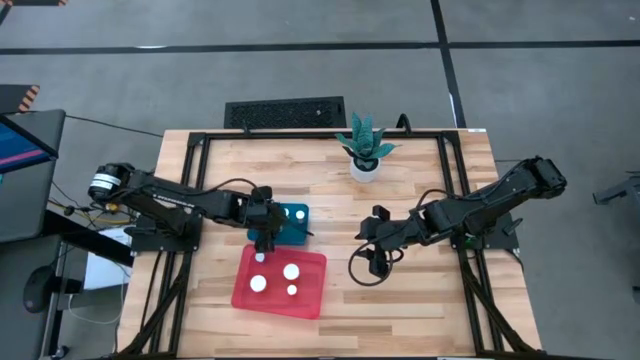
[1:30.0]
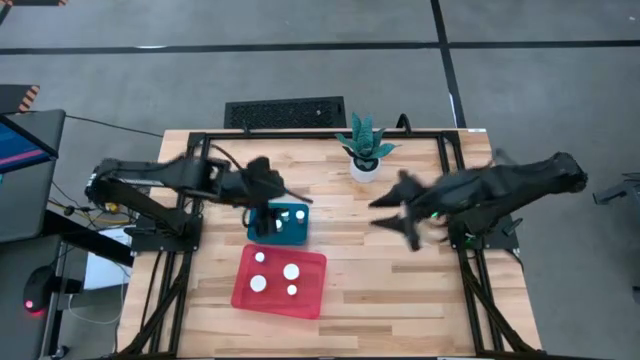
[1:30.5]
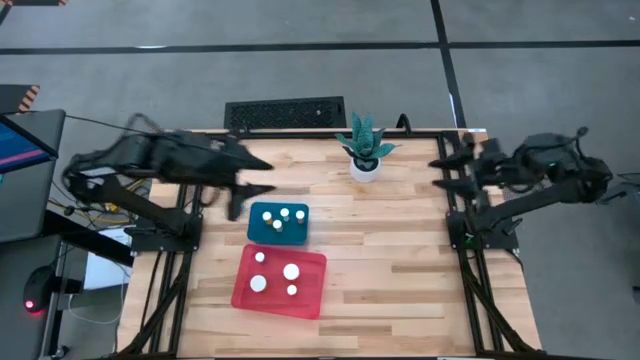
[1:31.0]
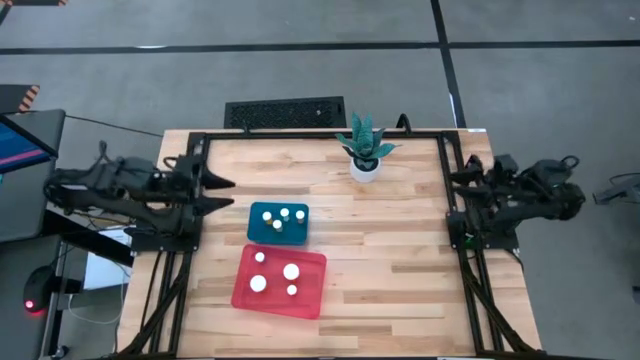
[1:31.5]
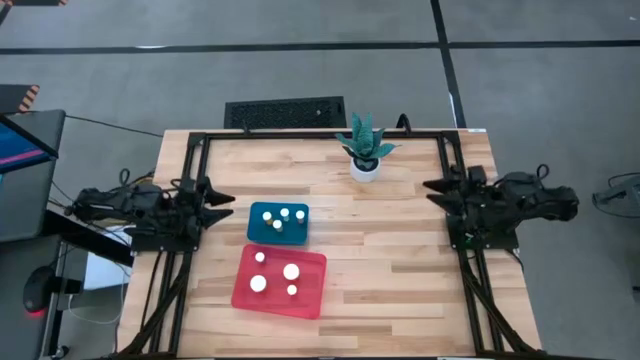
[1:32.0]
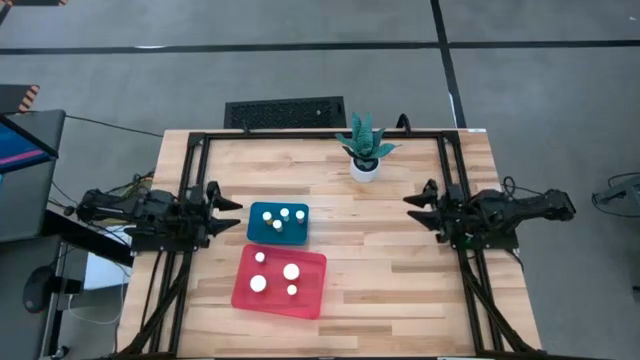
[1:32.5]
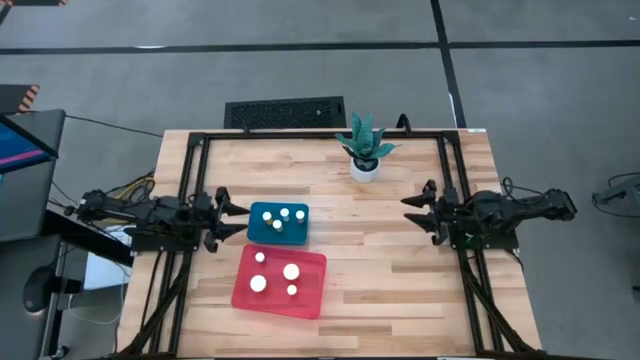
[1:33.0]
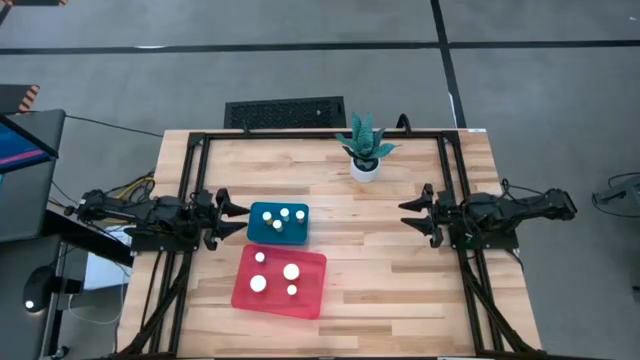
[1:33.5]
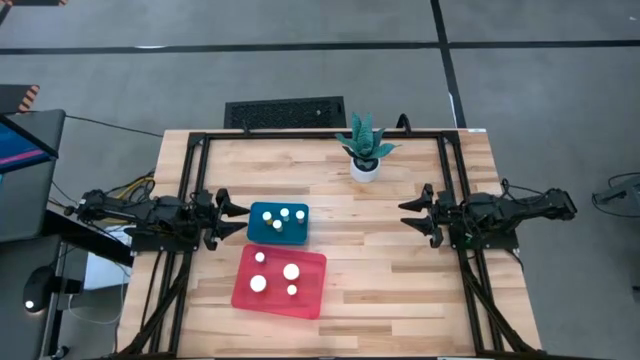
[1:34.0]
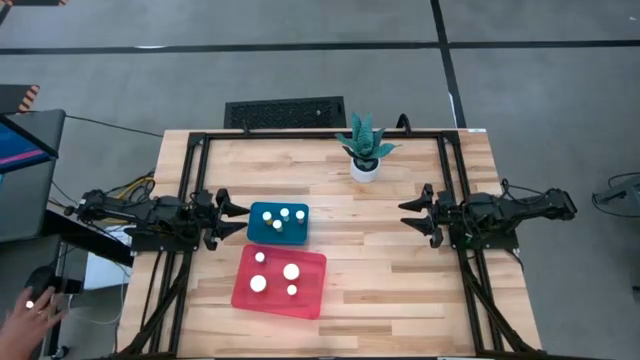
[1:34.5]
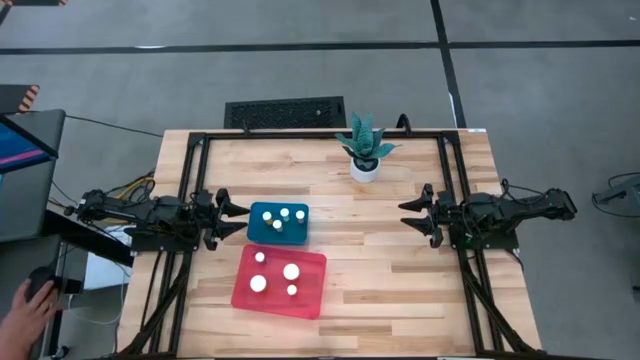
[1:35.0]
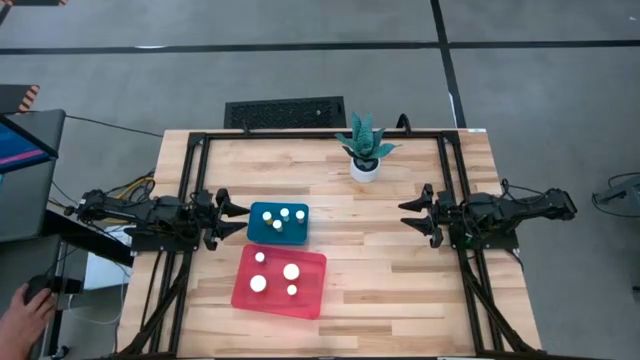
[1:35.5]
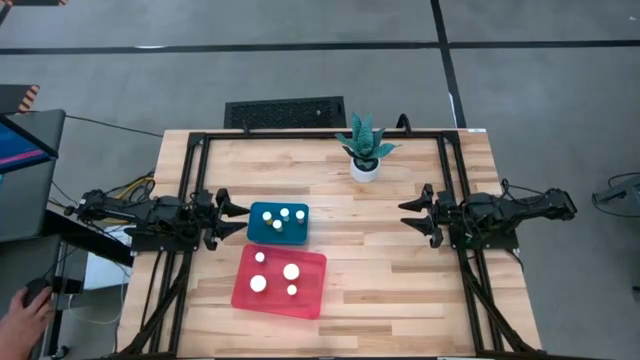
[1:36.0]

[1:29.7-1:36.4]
Task: Pick and place medicine bottles into bin by pill shape (circle, oval)
Return to Home Position

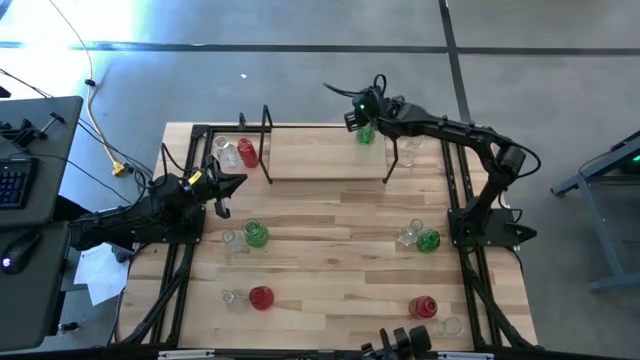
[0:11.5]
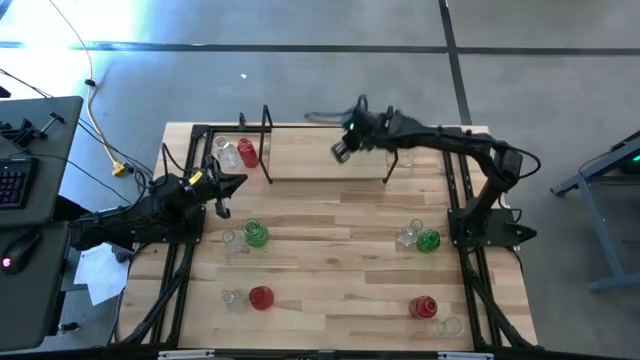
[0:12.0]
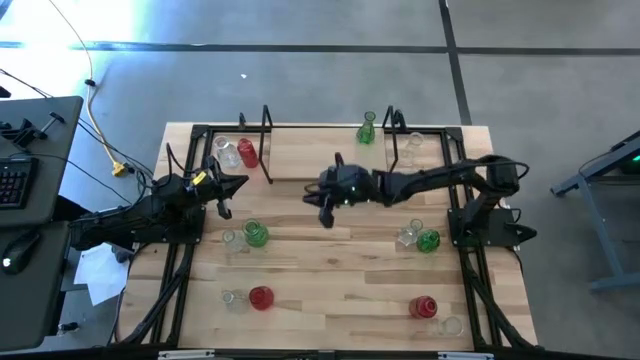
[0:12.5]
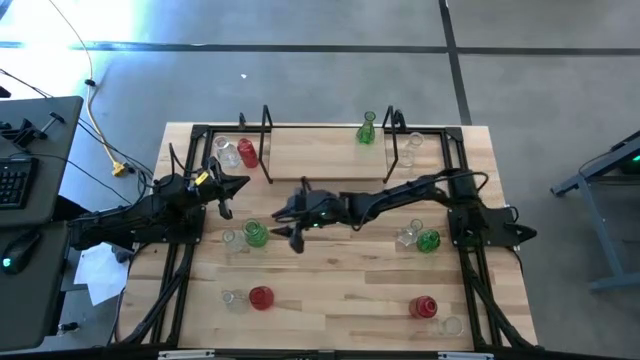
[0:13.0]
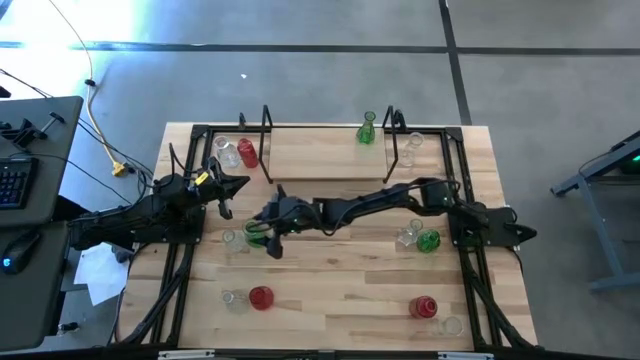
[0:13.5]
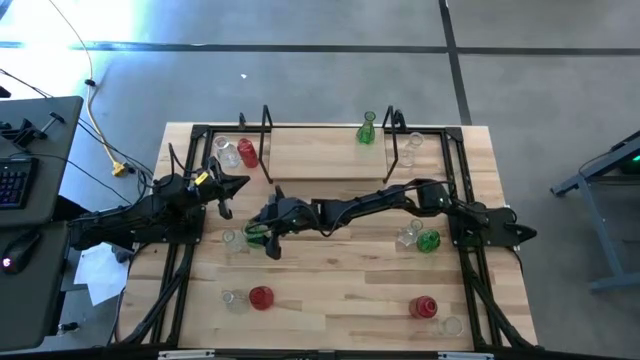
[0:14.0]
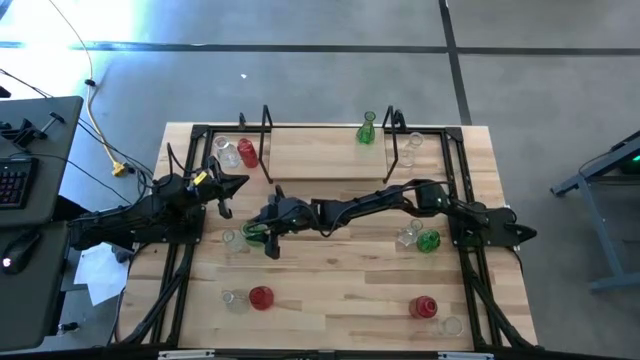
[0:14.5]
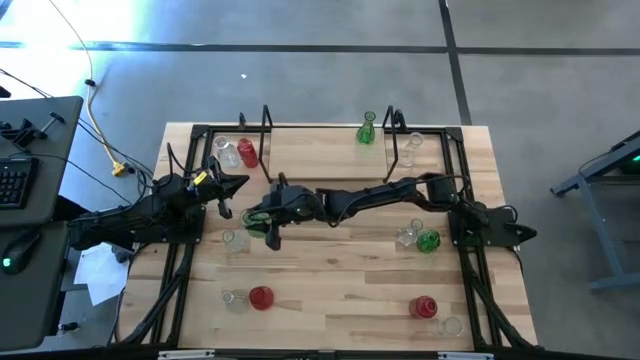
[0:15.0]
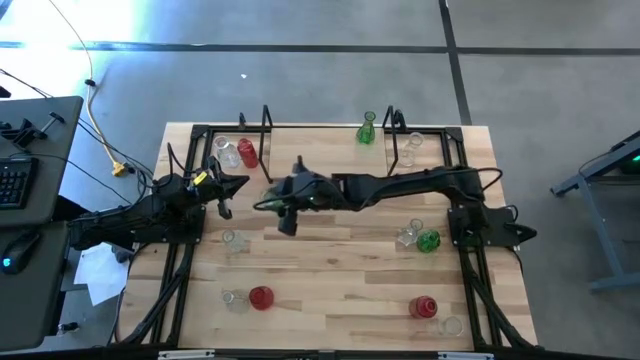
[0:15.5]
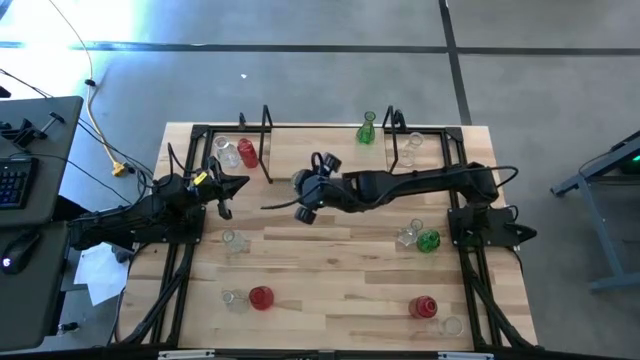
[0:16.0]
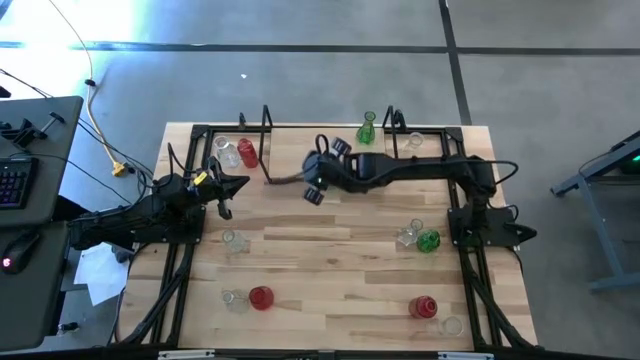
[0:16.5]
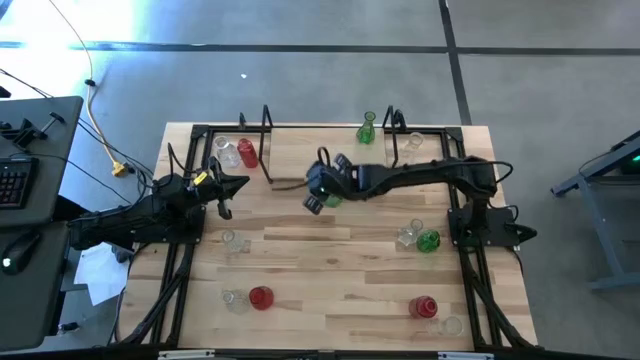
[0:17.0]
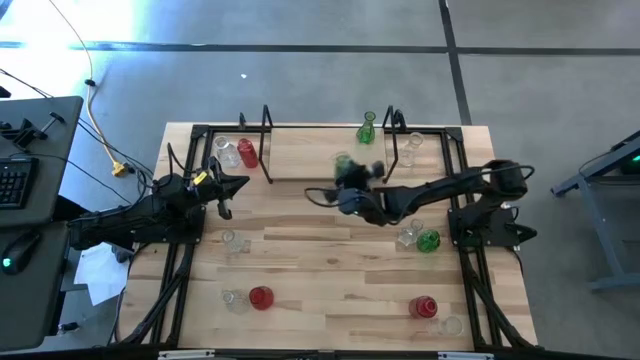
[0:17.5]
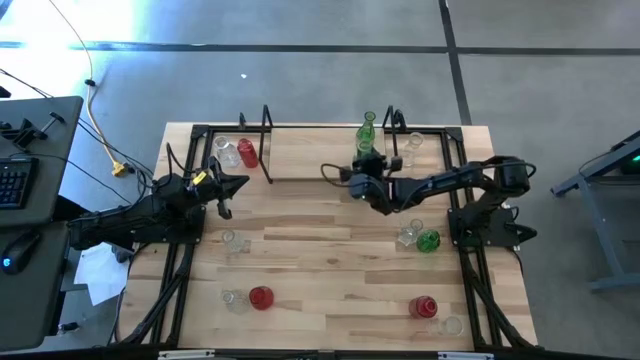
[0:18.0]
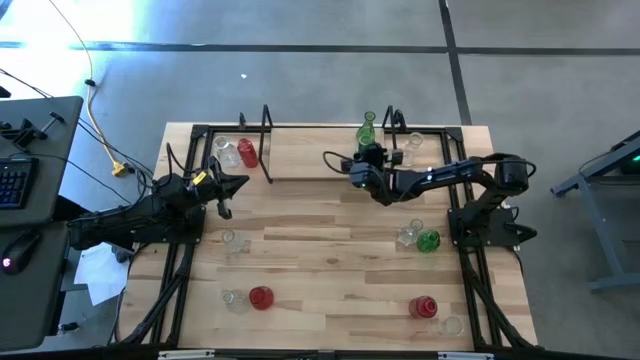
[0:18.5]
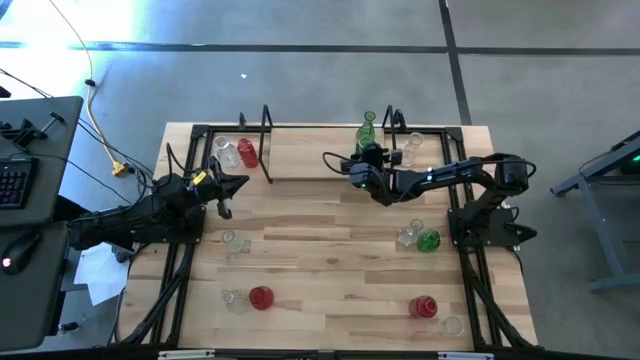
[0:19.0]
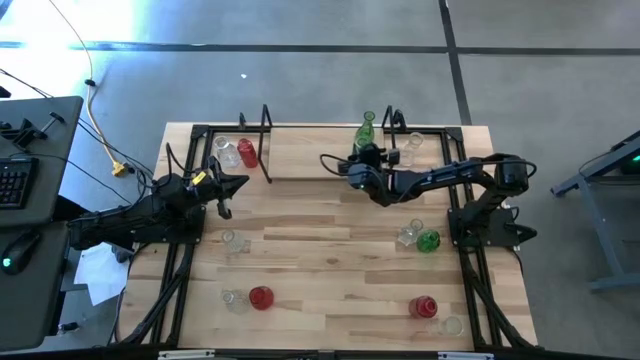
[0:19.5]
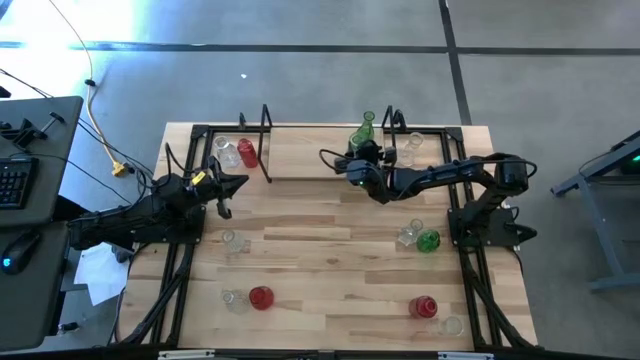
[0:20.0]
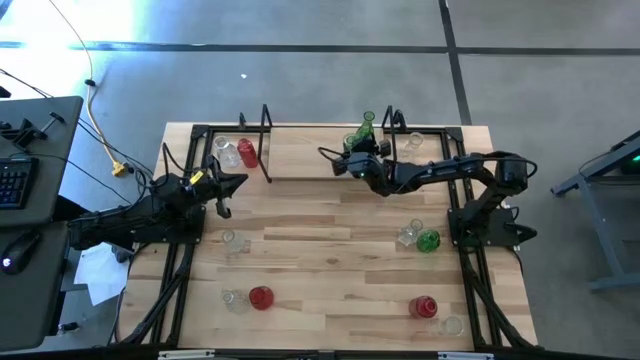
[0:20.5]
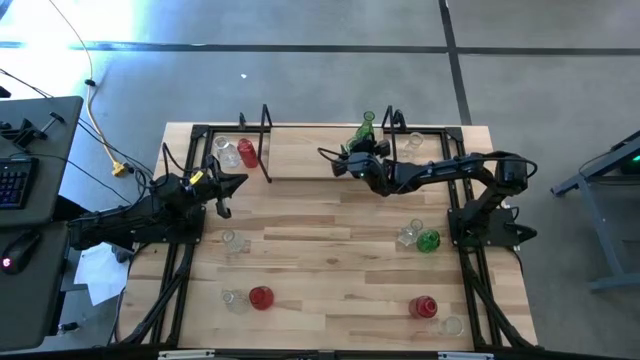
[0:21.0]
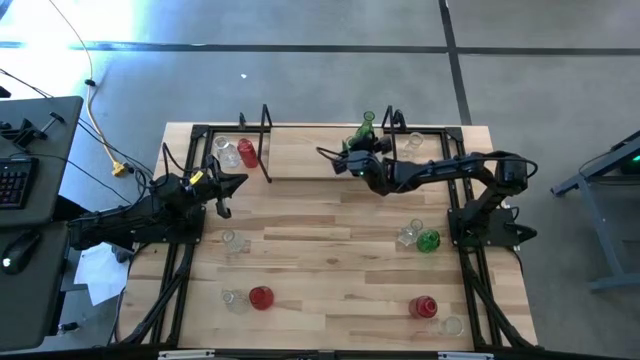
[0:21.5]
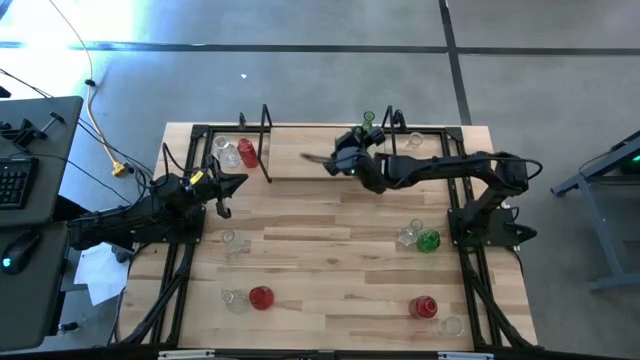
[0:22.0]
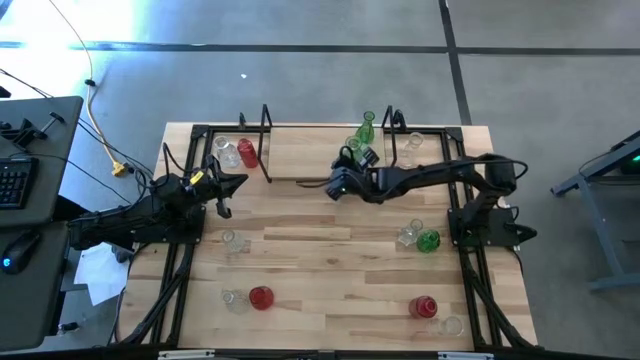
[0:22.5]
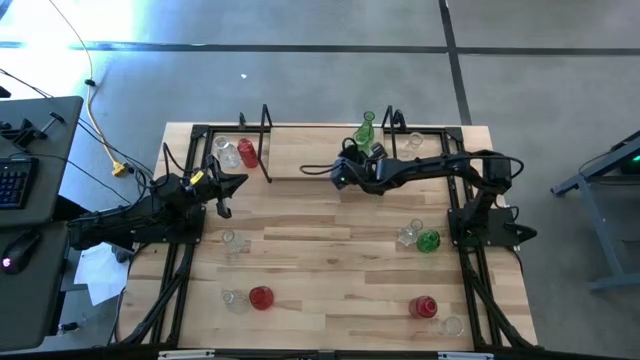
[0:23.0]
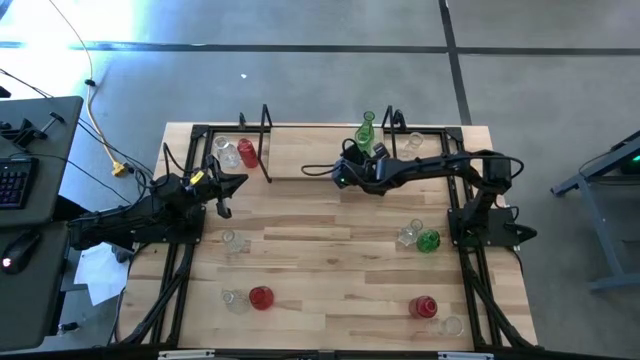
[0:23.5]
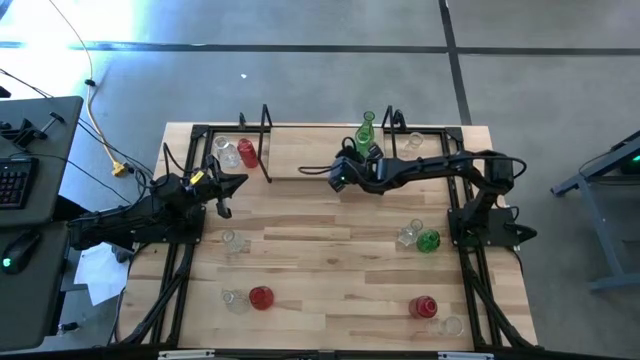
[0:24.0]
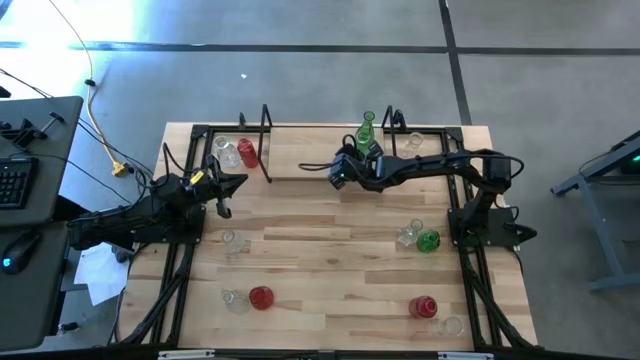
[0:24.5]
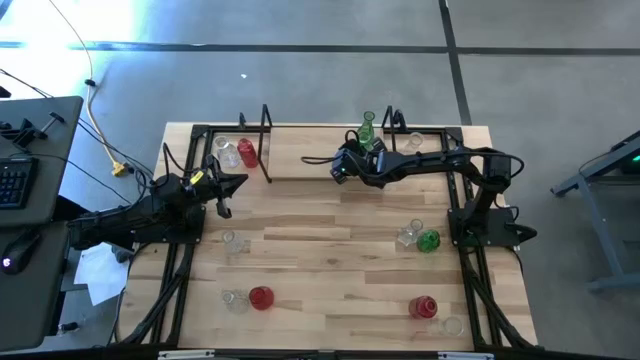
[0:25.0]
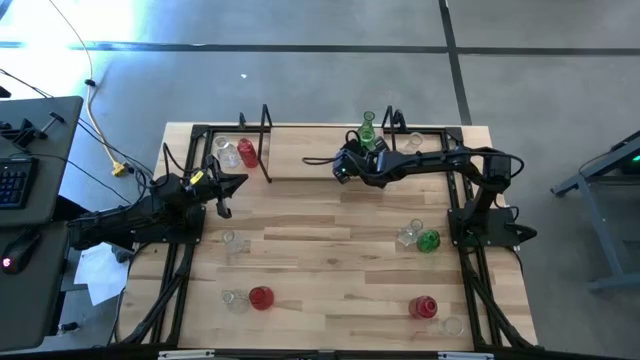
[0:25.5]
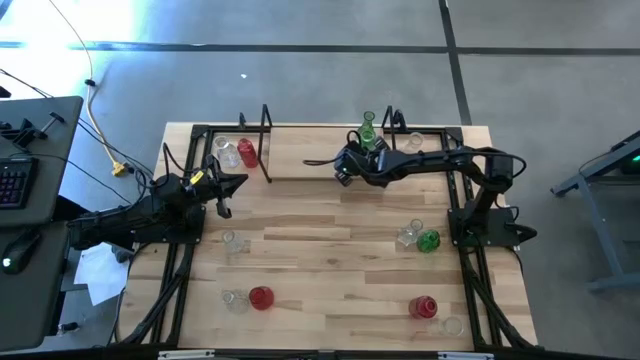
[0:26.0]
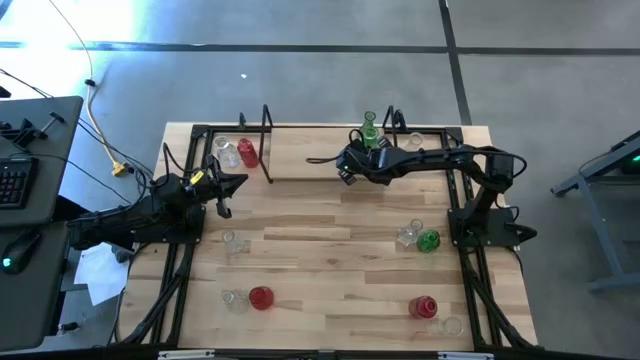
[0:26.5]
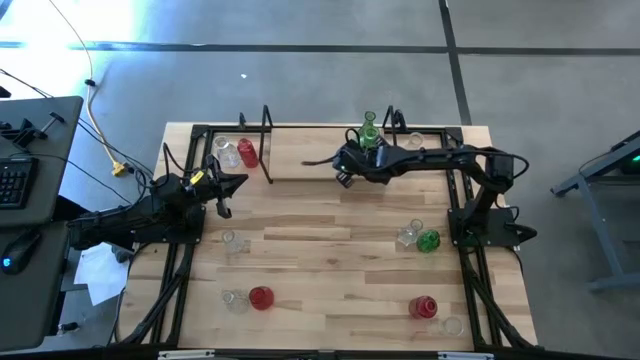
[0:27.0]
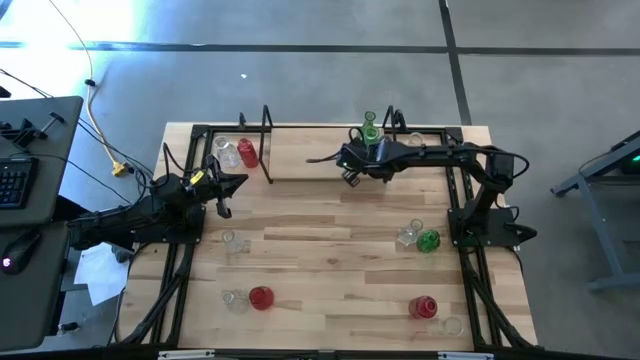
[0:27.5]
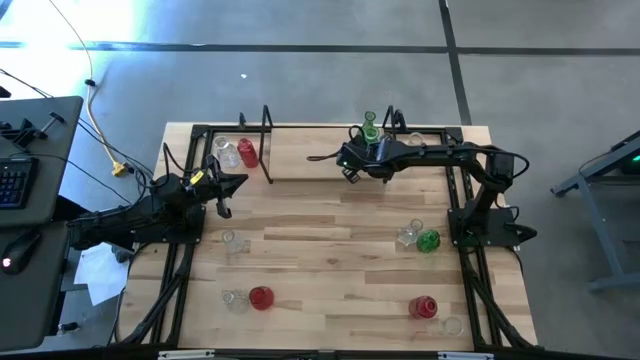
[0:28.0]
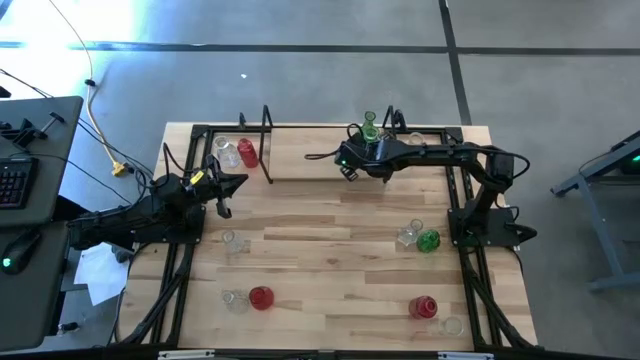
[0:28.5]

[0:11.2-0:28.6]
Task: sort vases onto shelf
Put the left green vase aligned with the other green vase on the shelf
